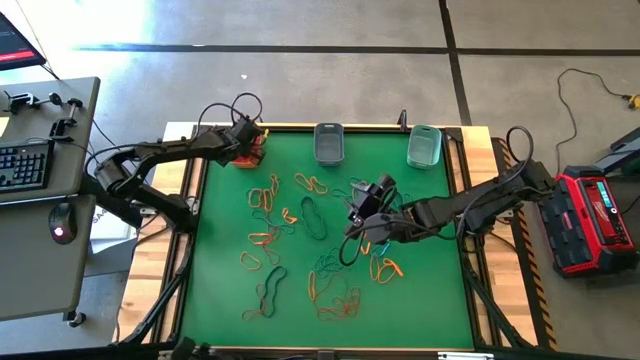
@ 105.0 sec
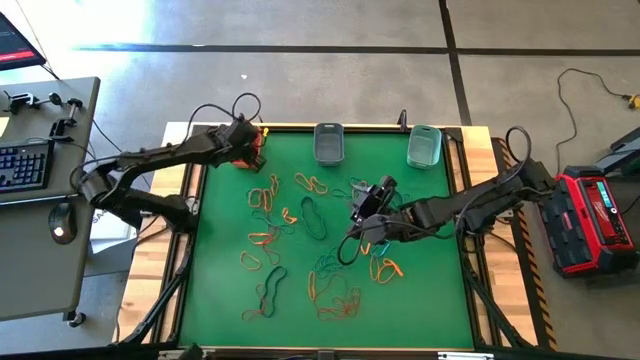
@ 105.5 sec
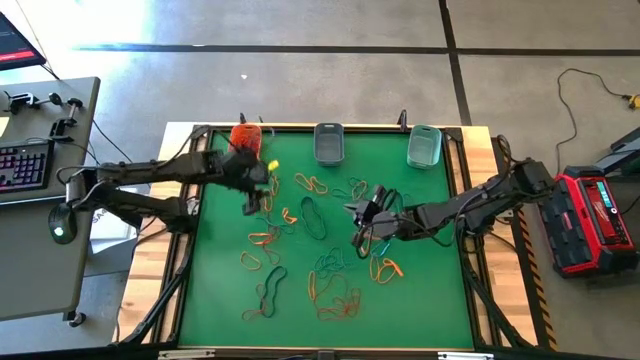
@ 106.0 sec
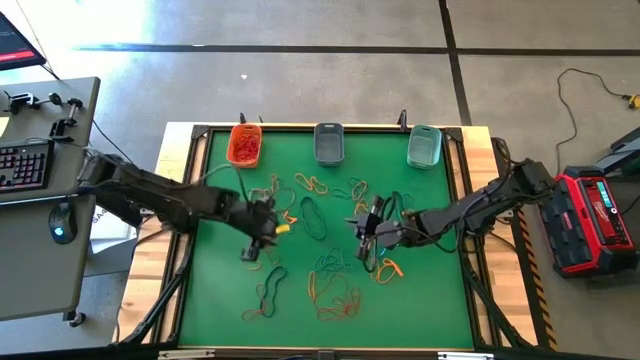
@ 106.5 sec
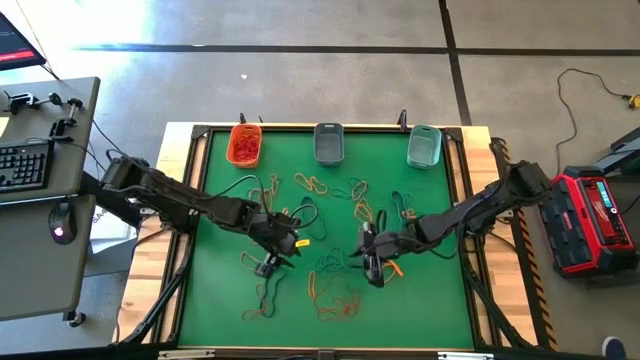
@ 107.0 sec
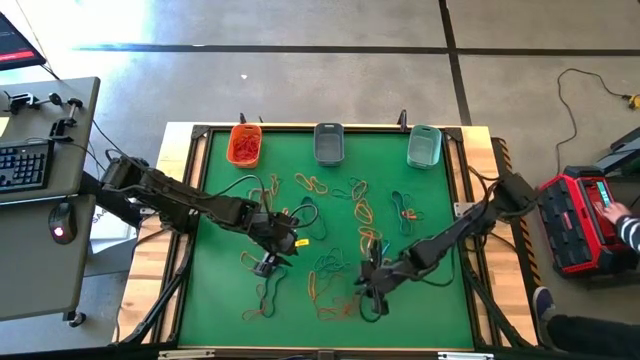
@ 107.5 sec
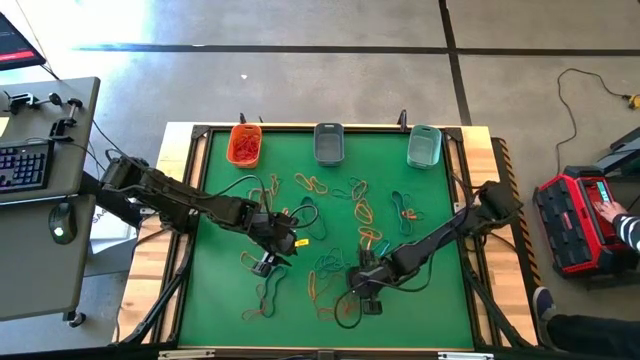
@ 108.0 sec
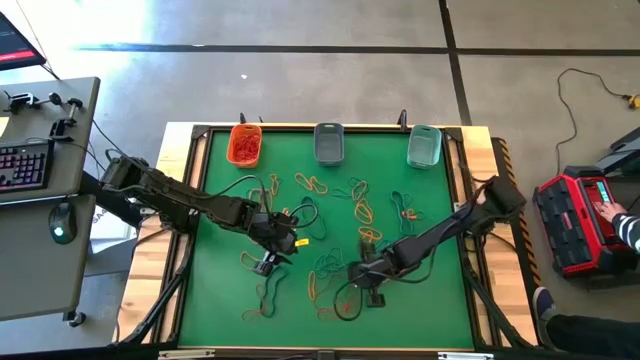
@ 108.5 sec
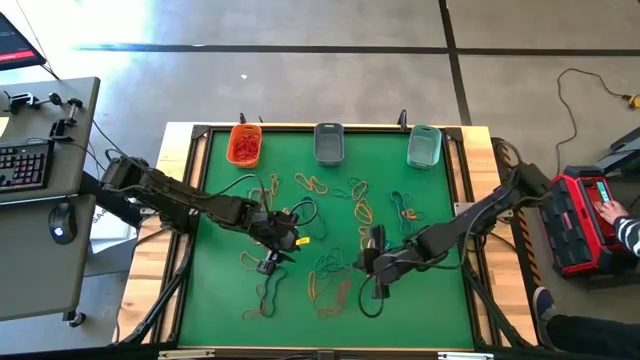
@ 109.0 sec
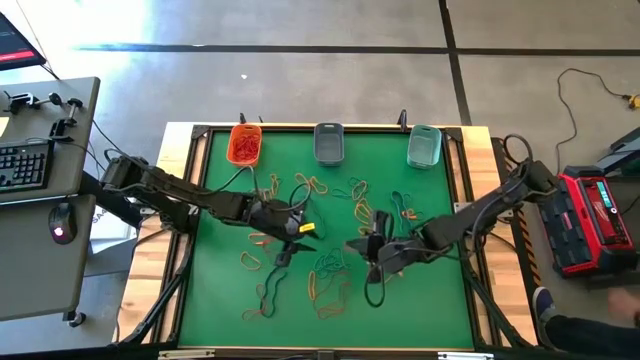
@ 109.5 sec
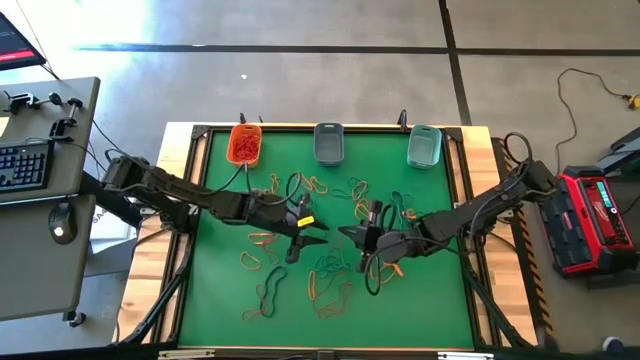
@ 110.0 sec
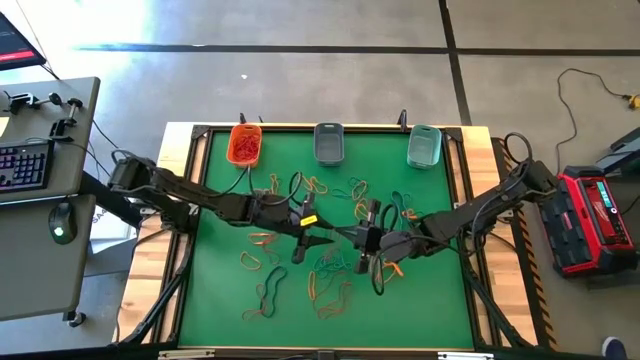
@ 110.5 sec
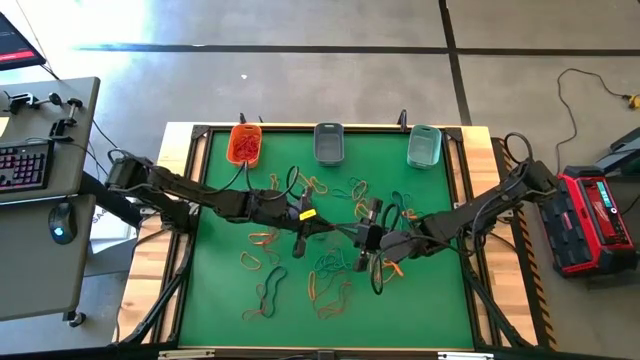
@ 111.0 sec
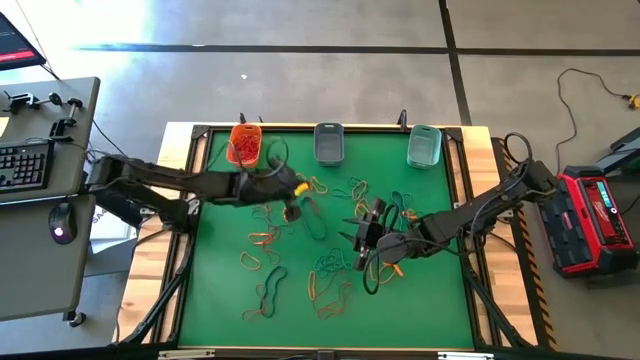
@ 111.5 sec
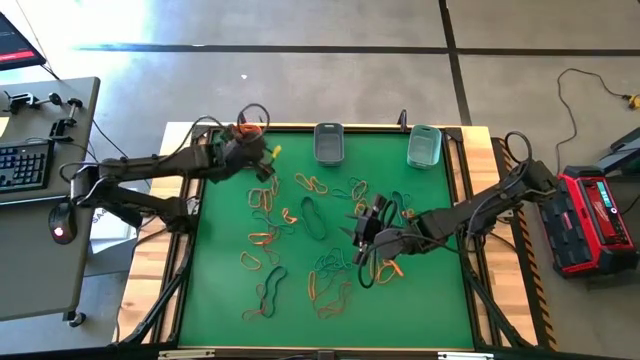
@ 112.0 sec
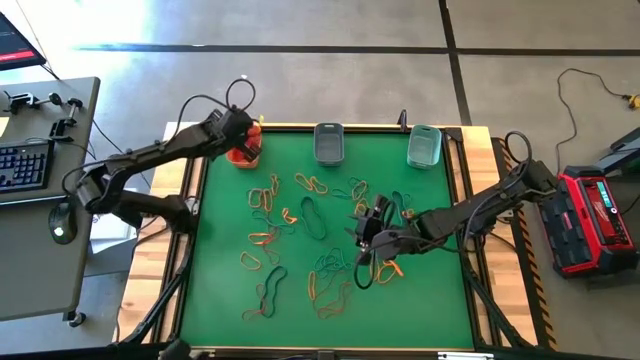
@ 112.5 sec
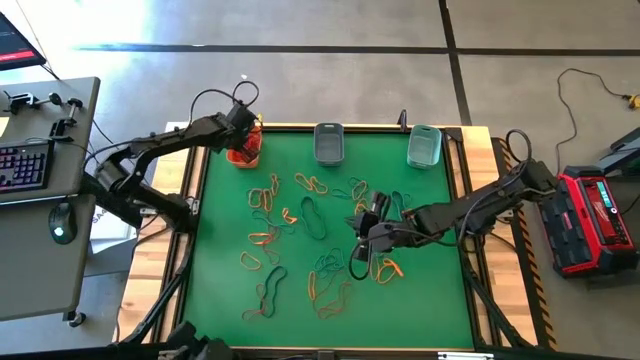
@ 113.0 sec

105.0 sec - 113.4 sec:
Task: Sort rubber bands into baskets
Put the red rubber band into the orange bin

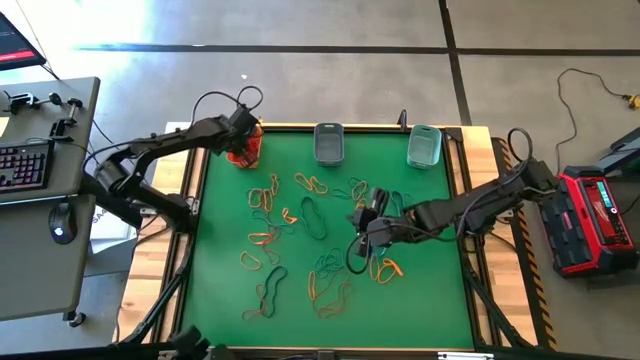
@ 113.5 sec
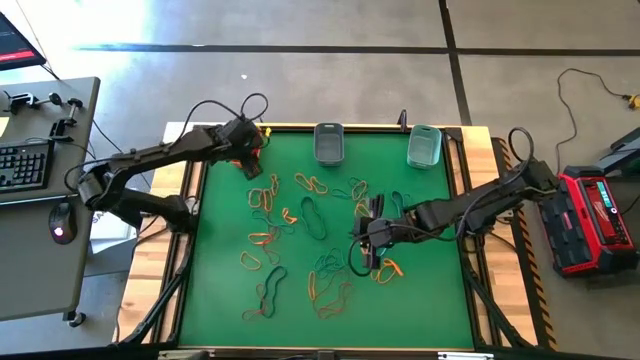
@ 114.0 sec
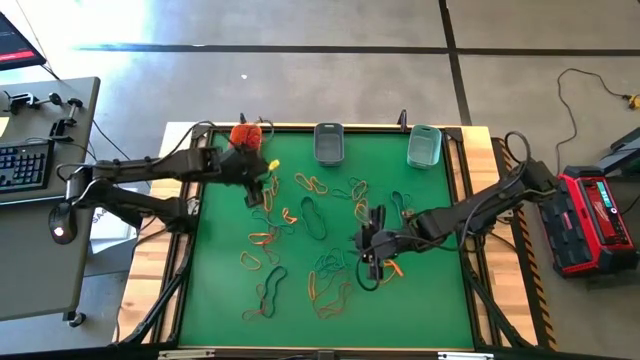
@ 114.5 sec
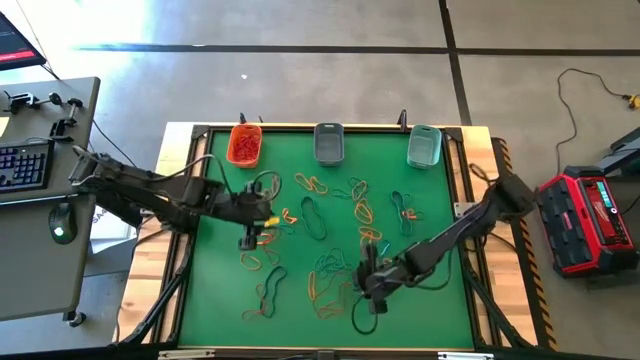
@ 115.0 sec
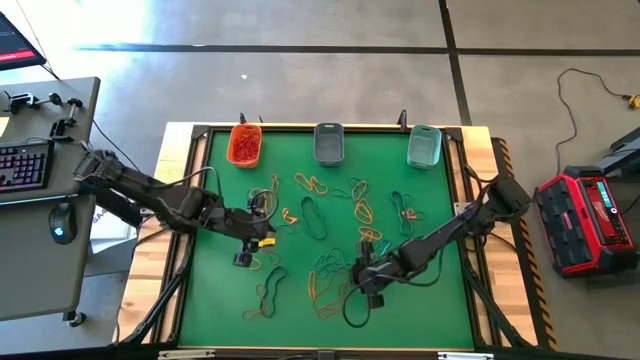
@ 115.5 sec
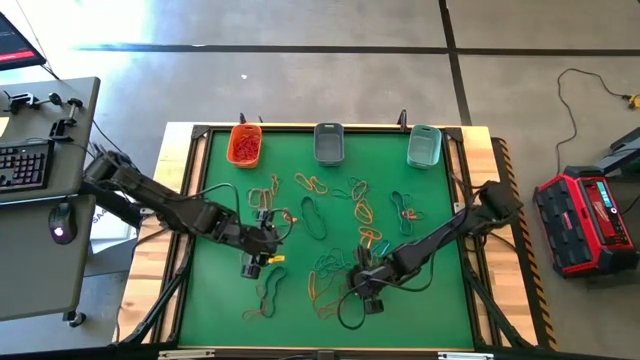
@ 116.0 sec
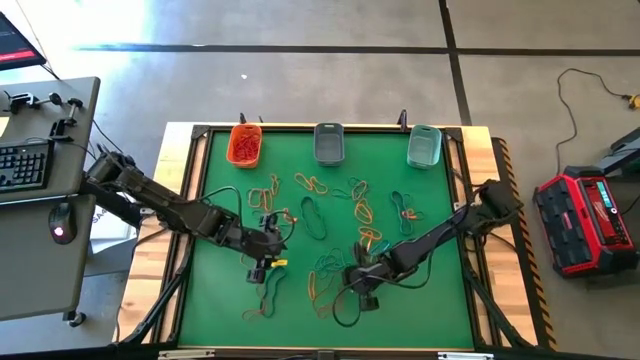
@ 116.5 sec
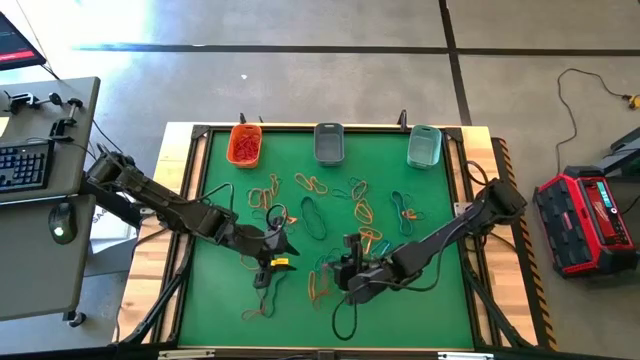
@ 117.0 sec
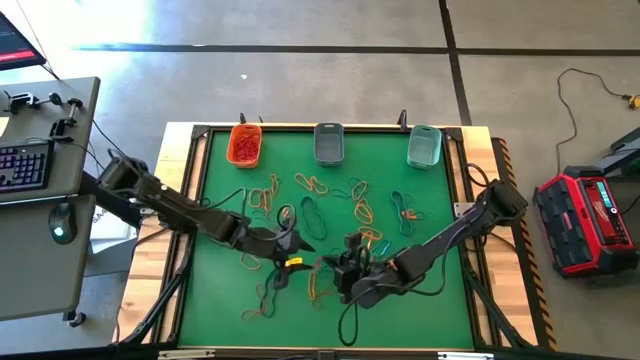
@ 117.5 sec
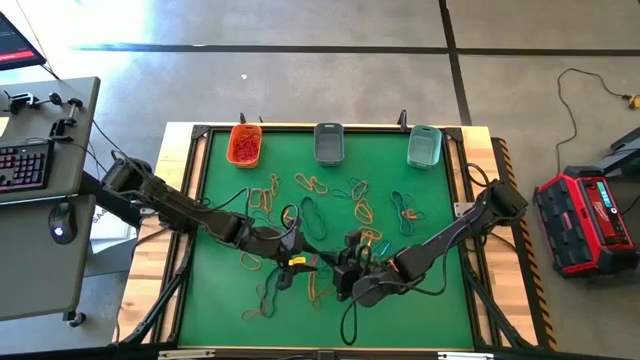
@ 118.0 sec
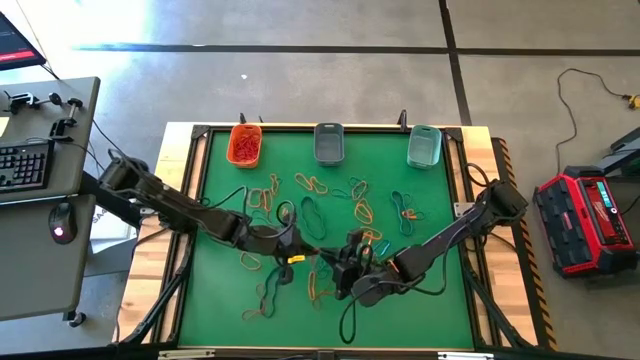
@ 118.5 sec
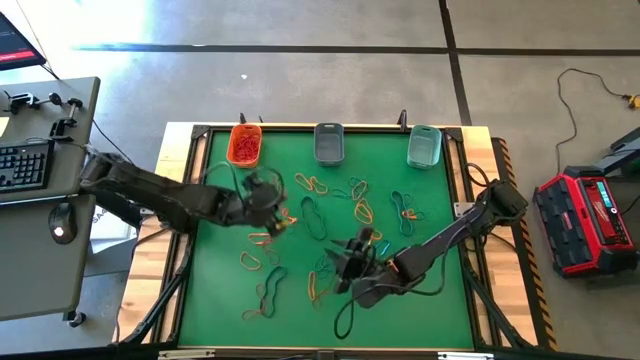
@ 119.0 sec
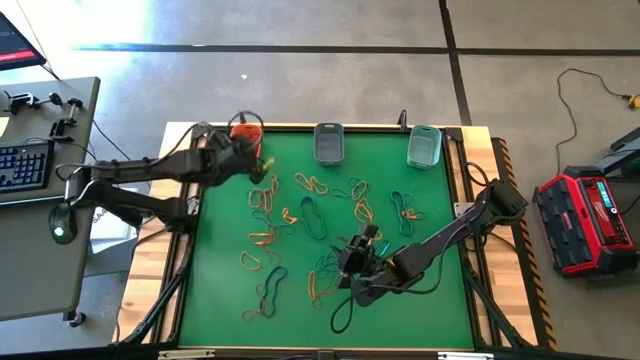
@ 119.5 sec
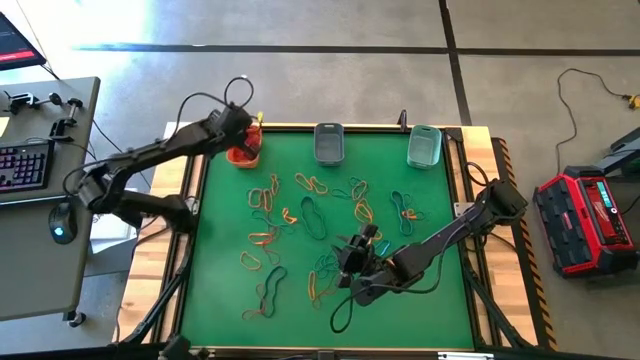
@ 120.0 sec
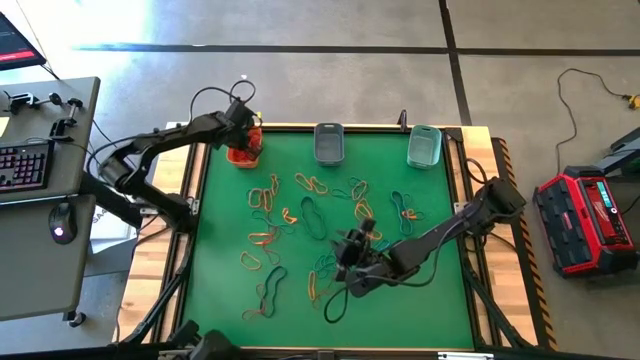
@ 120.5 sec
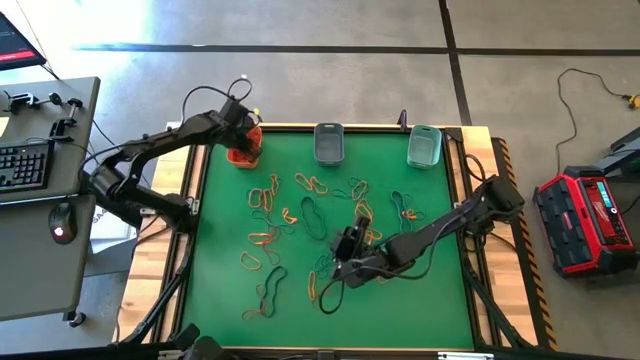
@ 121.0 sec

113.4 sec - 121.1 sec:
Put the red rubber band into the orange bin

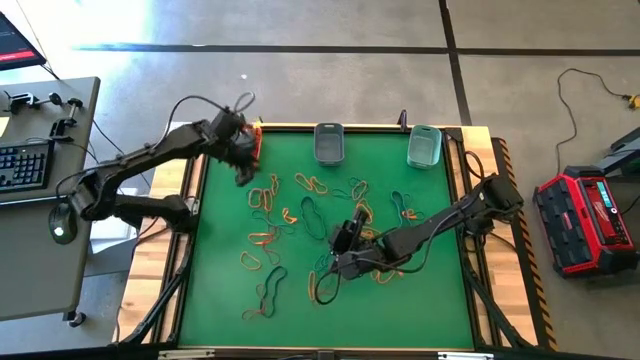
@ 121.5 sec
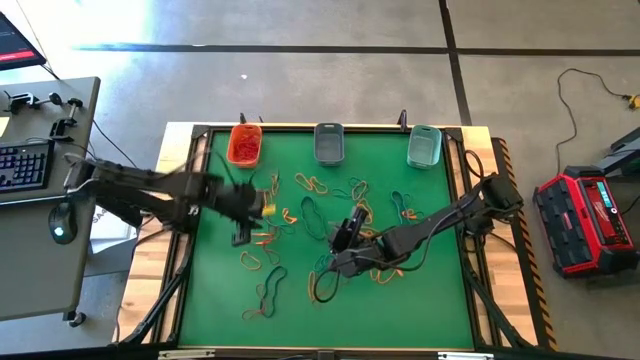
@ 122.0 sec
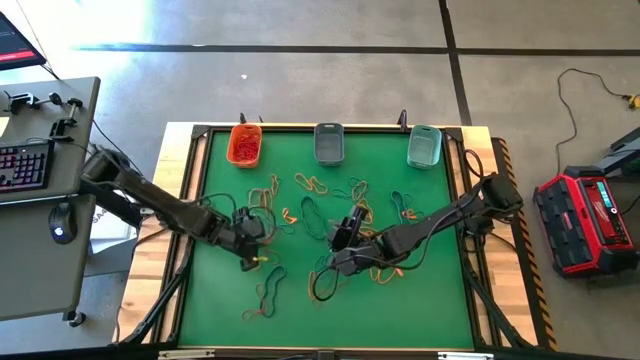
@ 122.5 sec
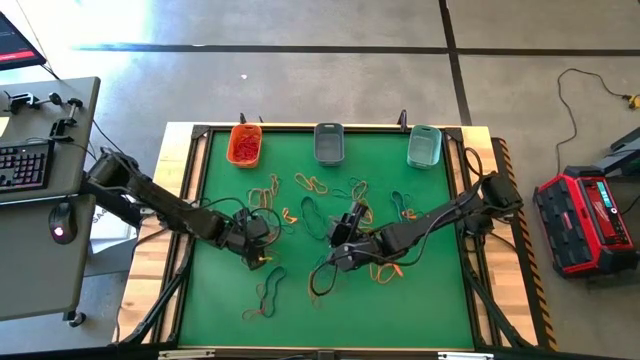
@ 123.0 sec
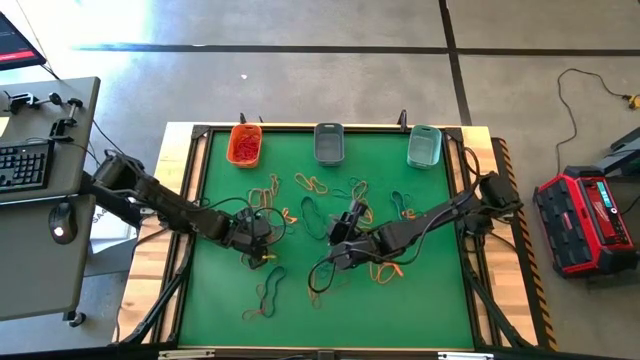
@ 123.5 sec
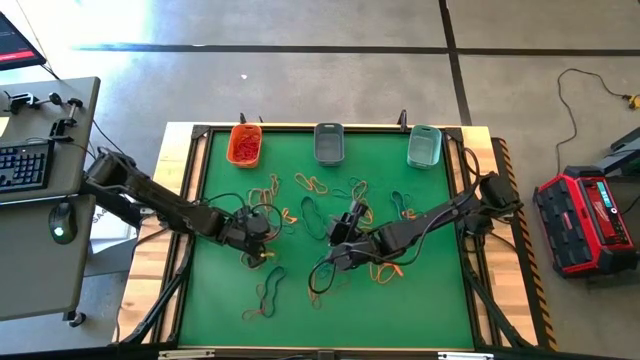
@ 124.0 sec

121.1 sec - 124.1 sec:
Put the red rubber band into the orange bin

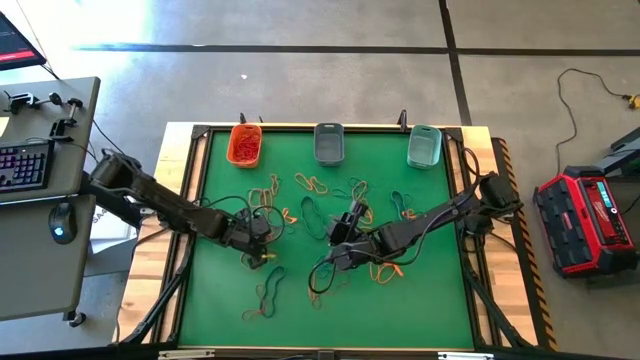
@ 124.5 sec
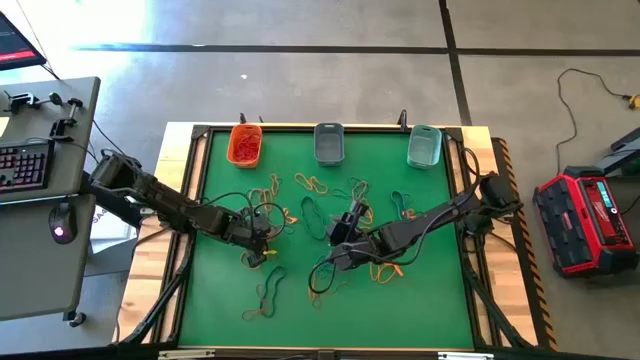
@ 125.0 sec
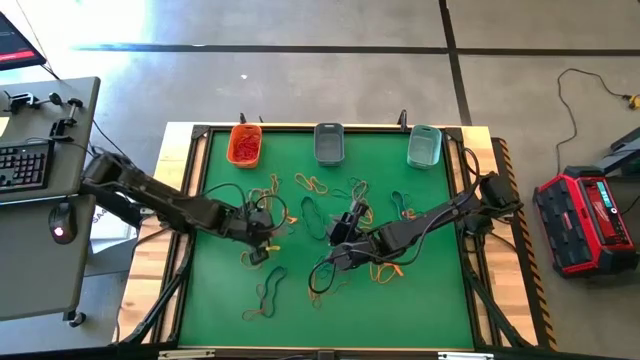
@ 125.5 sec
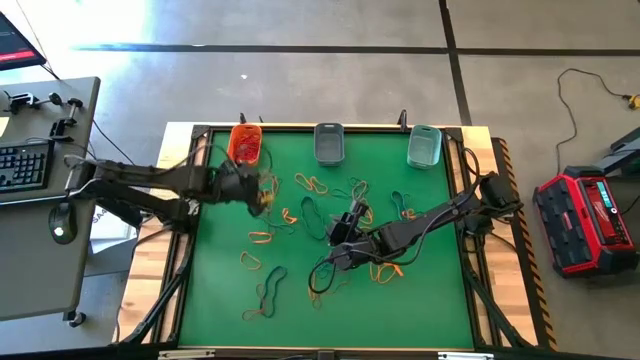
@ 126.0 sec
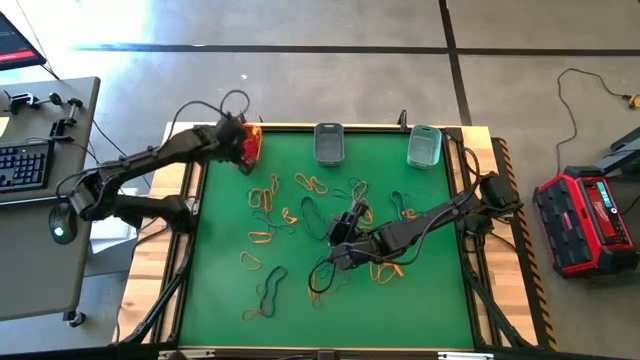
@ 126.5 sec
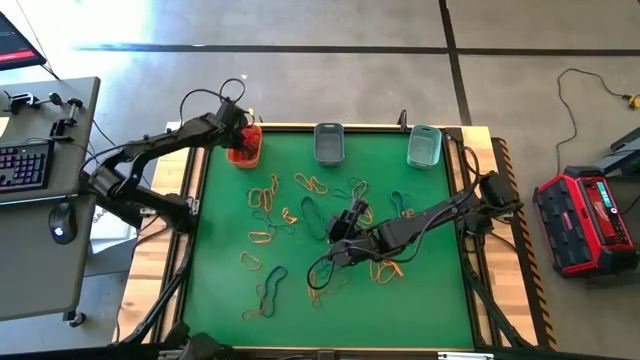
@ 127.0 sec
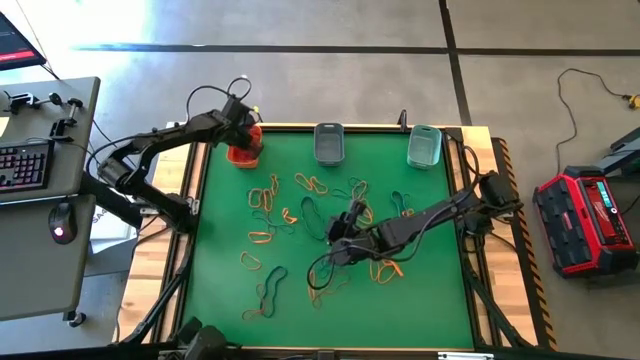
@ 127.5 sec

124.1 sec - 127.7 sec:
Put the red rubber band into the orange bin
